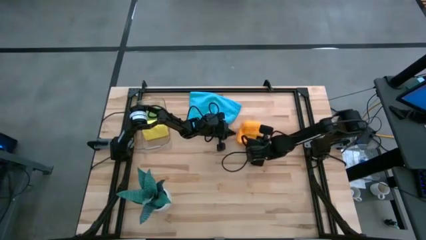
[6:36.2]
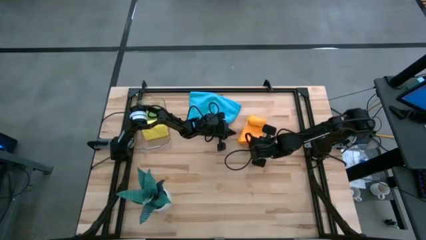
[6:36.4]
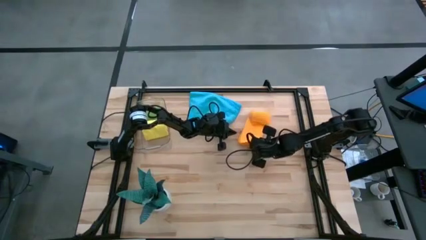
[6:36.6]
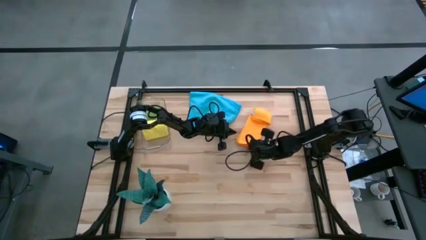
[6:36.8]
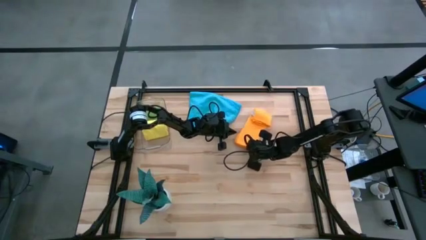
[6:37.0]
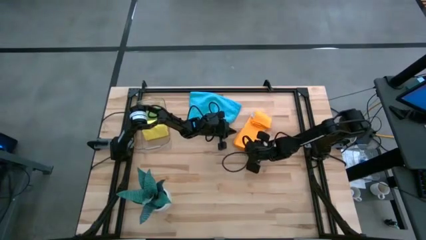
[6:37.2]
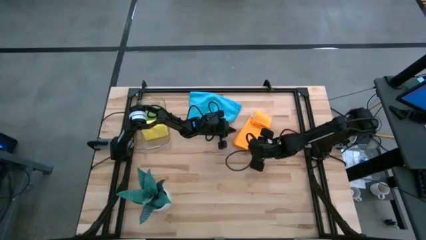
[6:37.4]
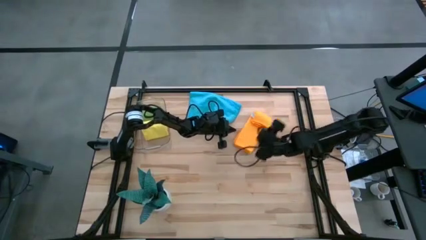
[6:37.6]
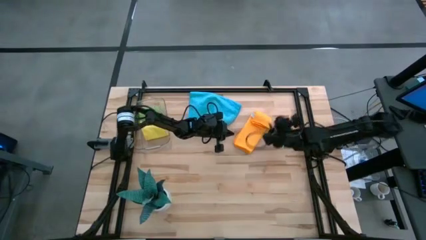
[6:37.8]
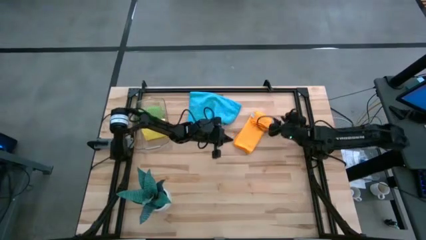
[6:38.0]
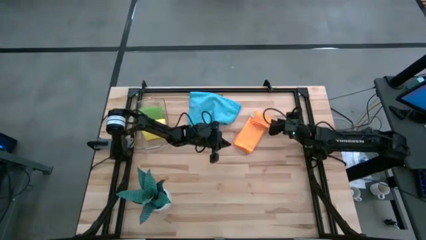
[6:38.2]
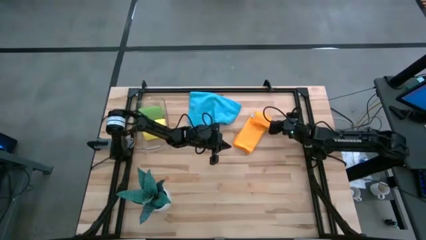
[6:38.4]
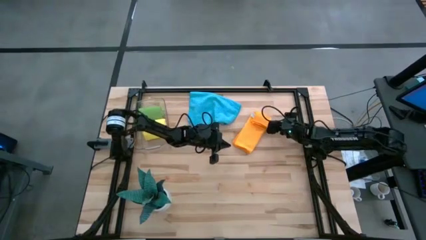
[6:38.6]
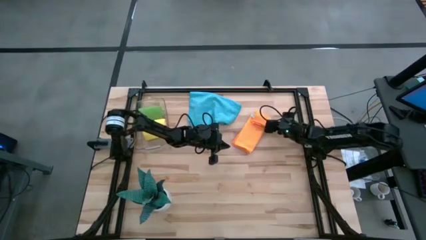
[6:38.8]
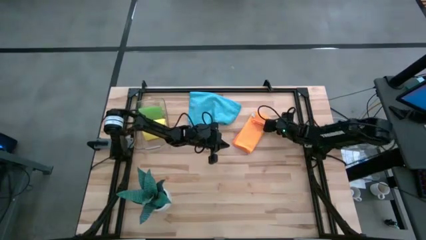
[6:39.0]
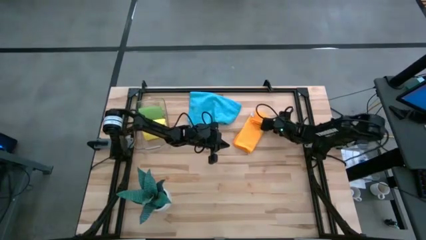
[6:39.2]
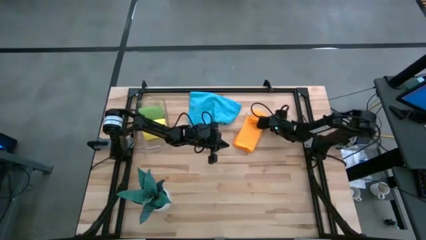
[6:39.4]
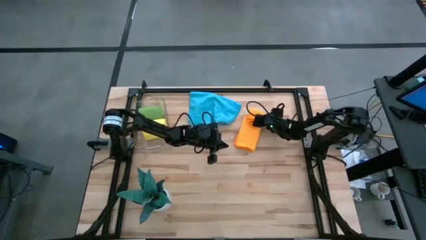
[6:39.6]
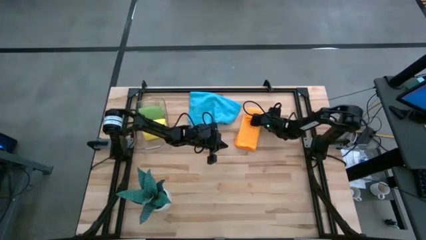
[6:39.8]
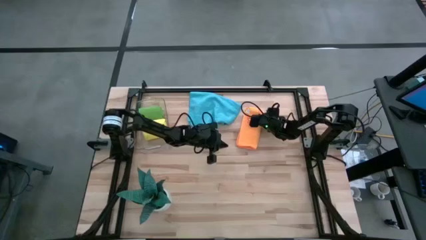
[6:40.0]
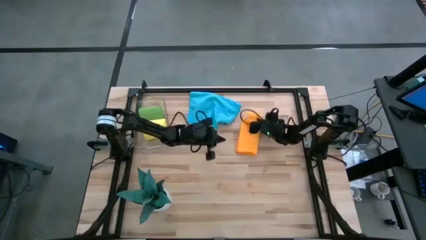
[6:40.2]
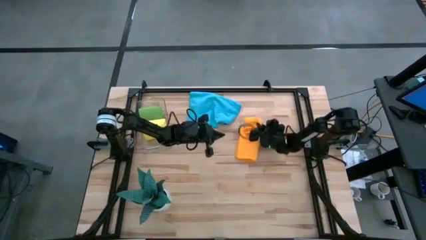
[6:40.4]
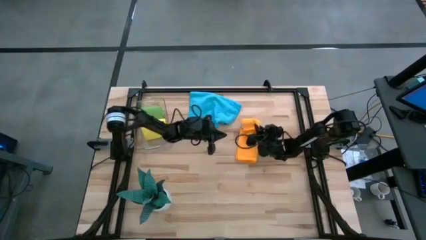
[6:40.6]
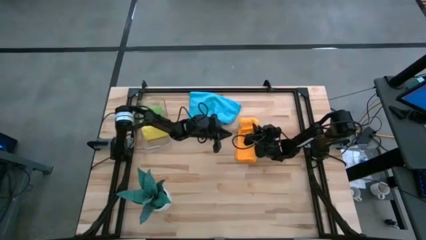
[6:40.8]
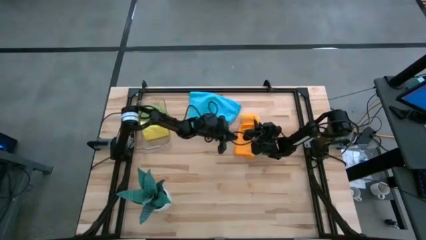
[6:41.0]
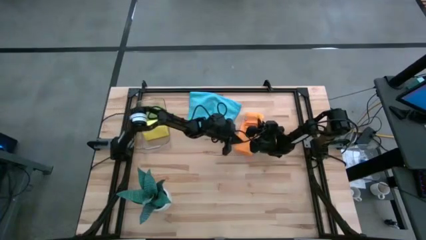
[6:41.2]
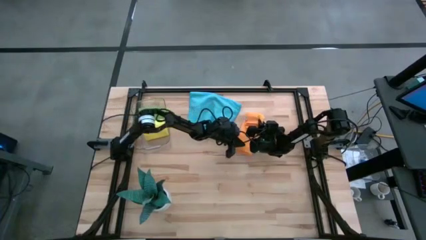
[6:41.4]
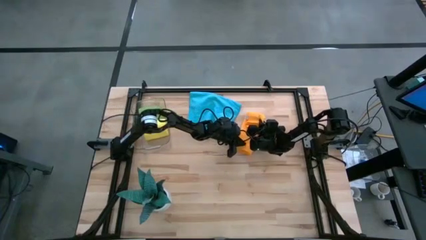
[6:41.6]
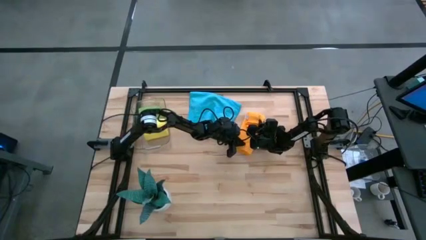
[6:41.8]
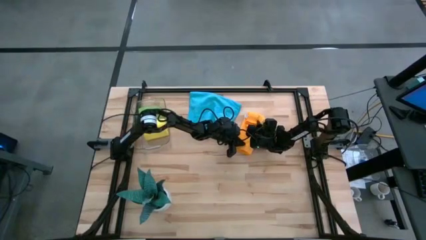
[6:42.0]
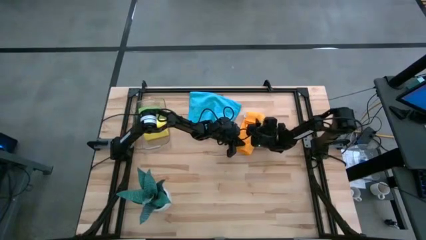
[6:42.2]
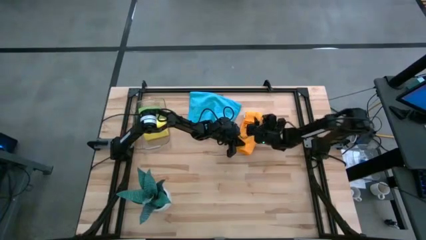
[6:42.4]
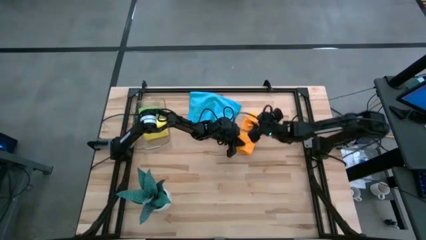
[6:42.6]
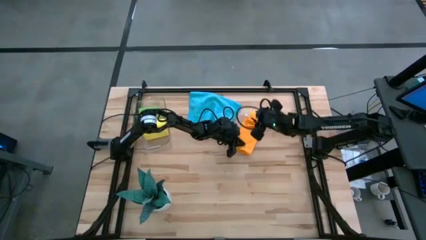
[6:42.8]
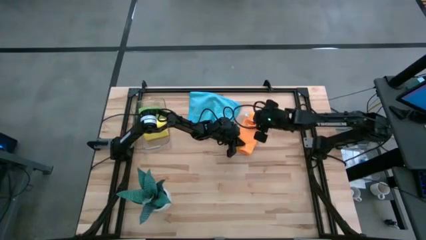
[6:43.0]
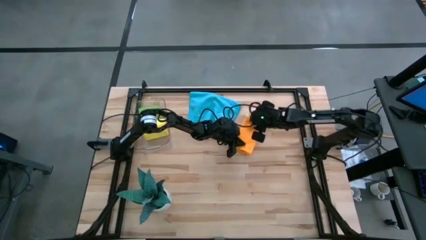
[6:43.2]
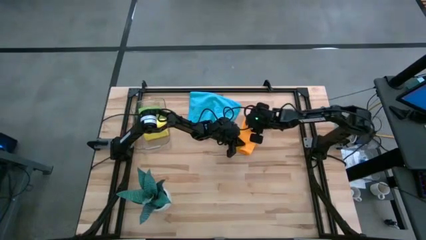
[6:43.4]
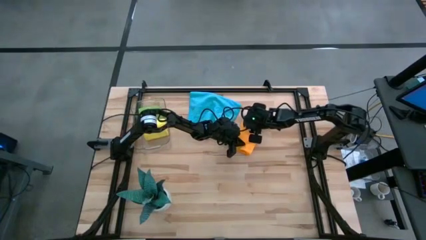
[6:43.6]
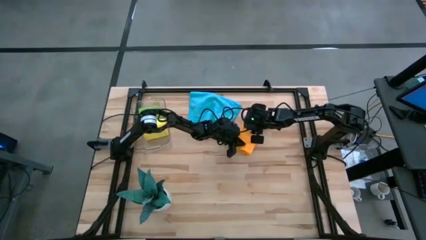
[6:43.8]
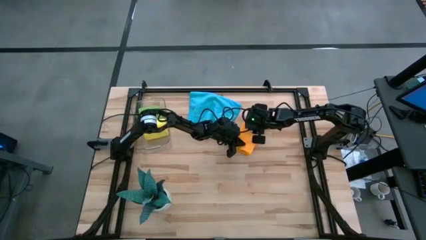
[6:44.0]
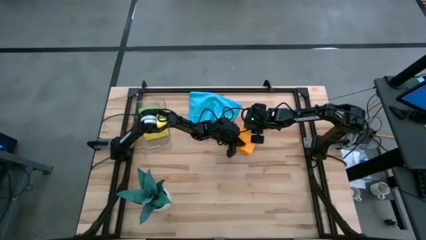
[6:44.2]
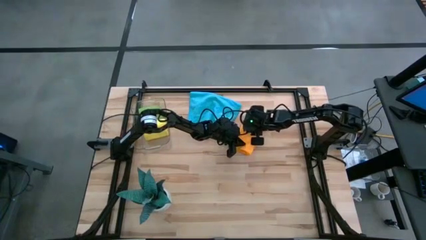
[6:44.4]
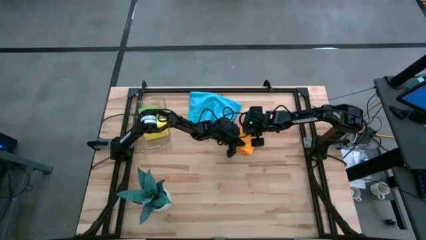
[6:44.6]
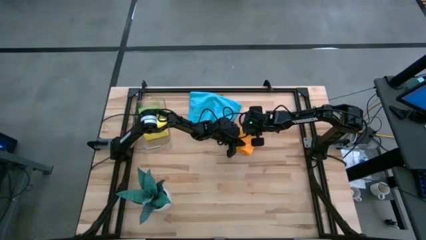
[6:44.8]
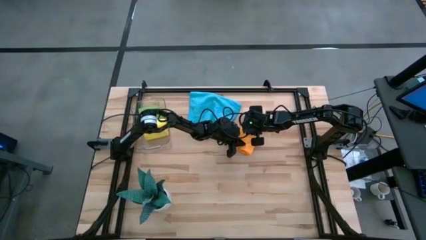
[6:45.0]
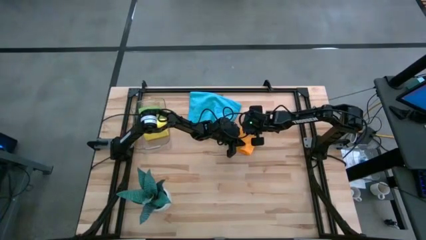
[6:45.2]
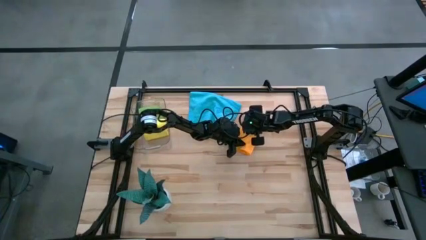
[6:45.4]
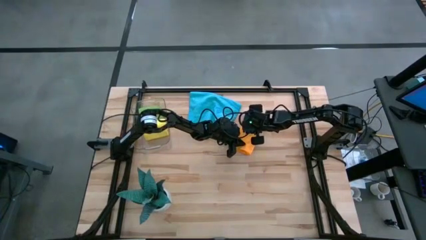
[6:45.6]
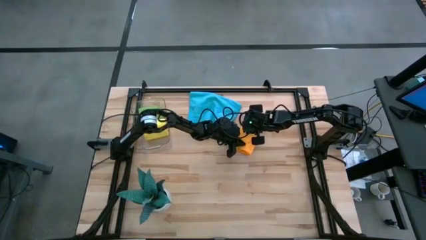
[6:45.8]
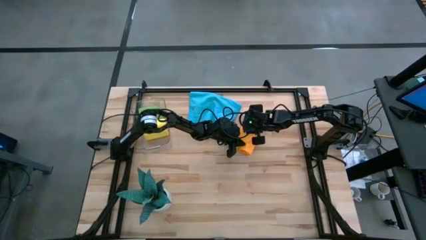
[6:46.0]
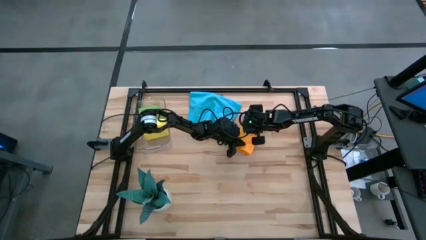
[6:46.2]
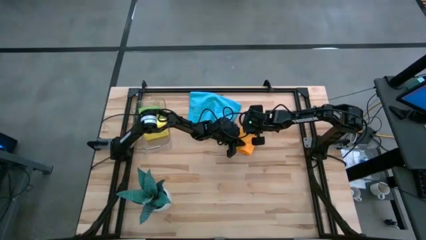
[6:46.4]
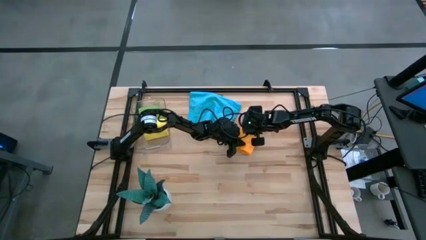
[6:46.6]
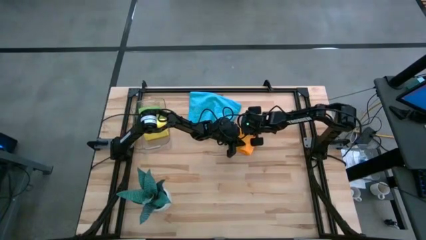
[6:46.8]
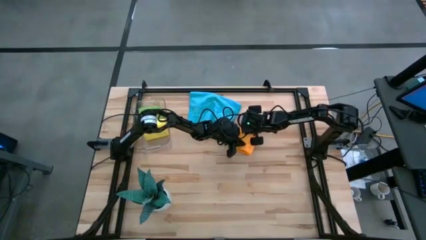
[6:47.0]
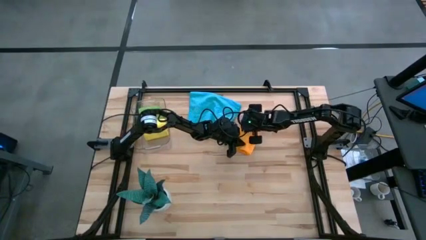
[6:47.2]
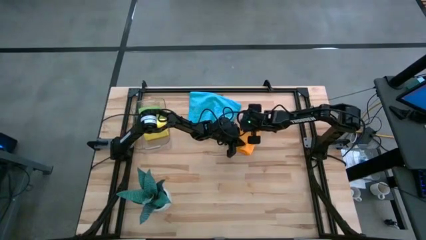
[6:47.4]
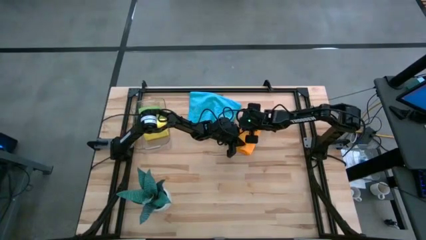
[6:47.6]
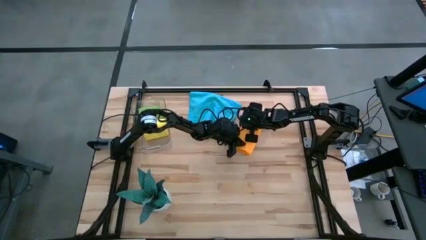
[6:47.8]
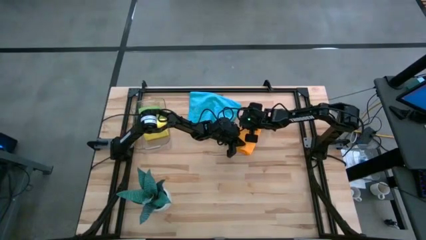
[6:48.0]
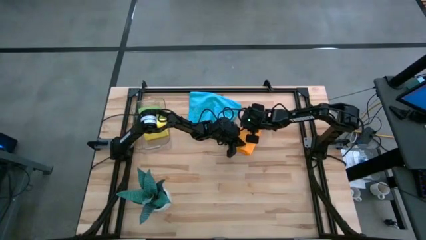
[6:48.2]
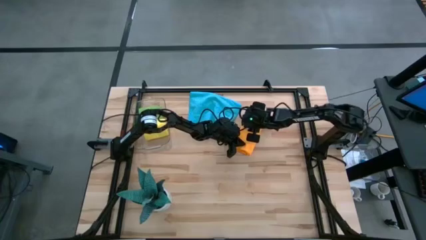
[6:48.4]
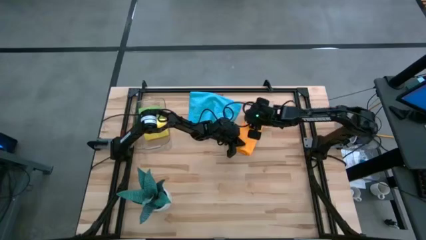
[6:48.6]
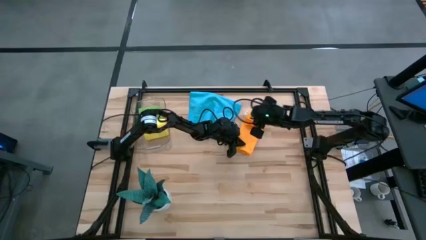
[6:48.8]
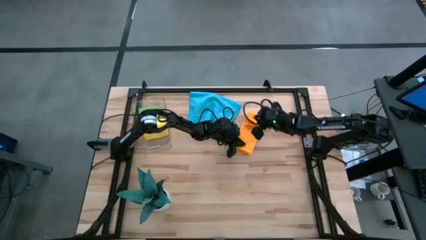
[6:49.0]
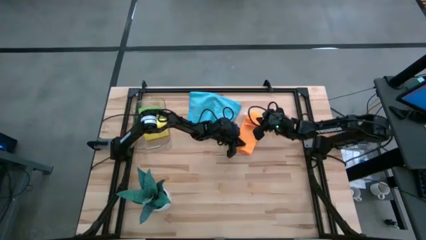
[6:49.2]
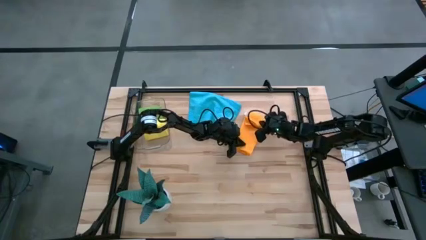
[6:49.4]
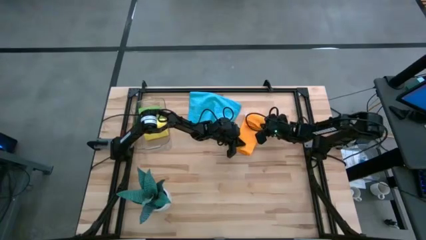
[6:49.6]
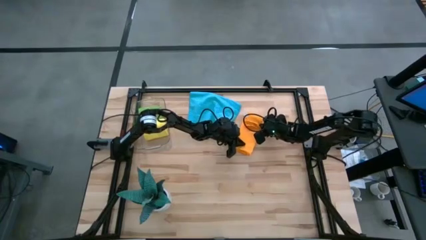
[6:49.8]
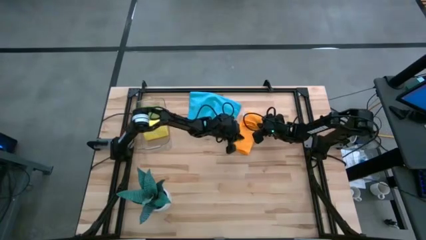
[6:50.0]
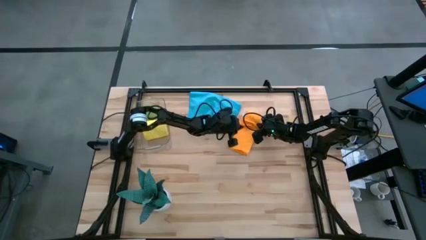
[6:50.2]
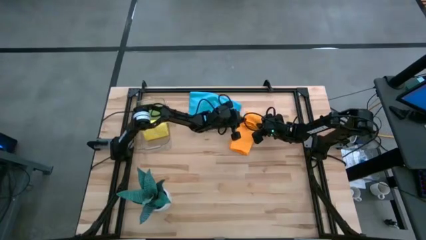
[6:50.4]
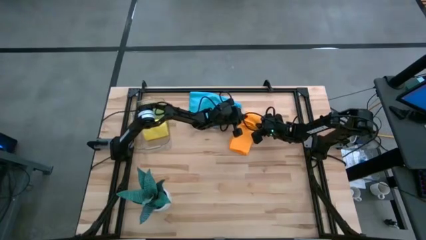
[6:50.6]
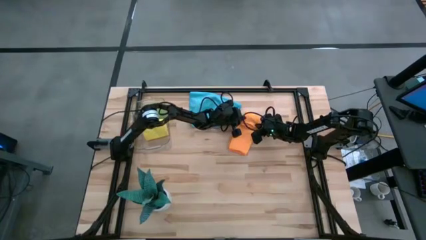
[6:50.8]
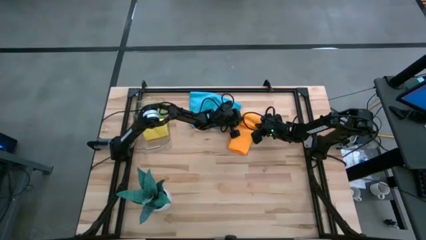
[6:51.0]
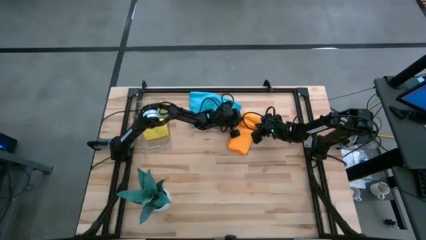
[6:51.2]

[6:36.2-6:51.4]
Task: Roll microfiber towels into tight, uniform cylinder then place into a basket
Roll the orange microfiber towel

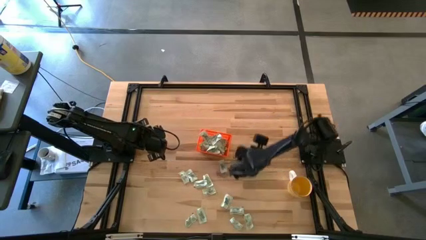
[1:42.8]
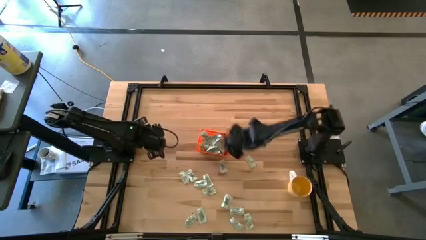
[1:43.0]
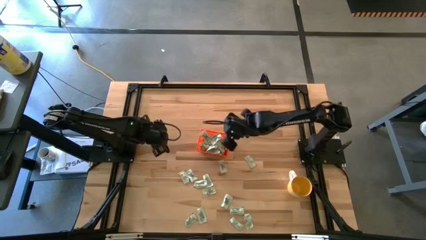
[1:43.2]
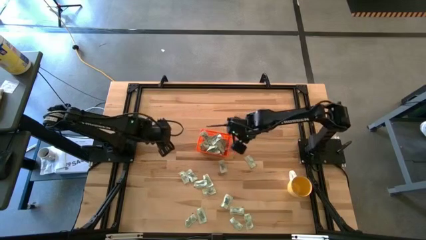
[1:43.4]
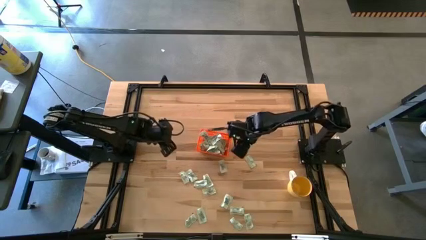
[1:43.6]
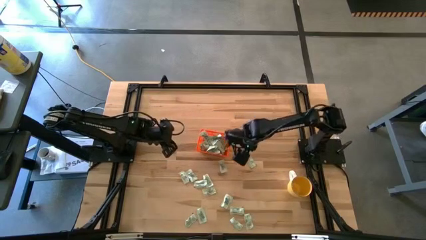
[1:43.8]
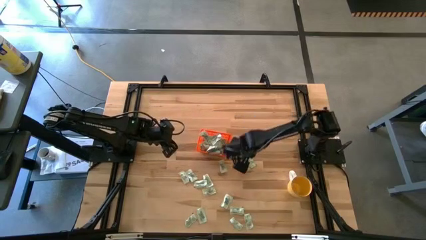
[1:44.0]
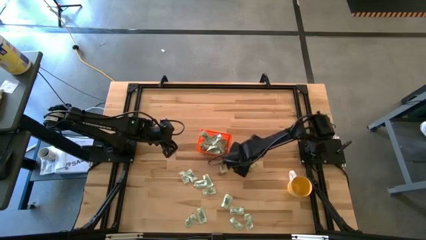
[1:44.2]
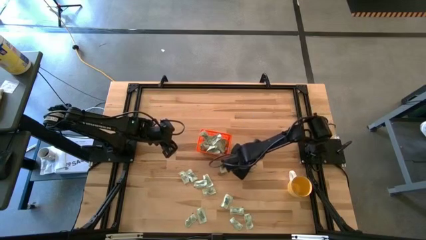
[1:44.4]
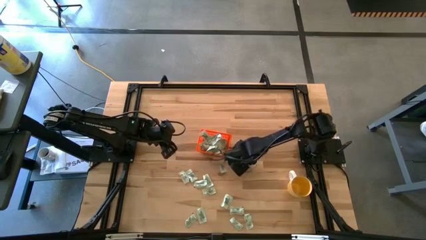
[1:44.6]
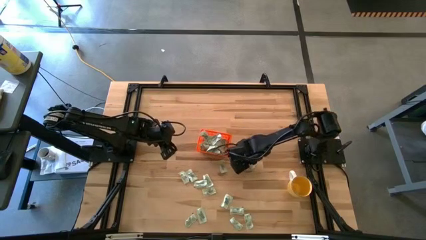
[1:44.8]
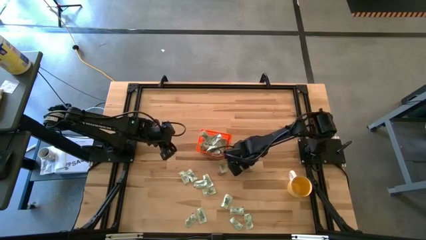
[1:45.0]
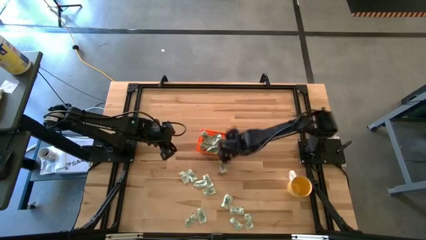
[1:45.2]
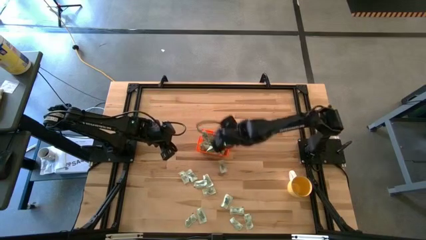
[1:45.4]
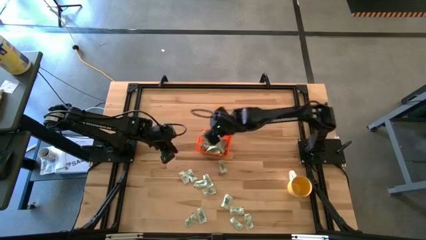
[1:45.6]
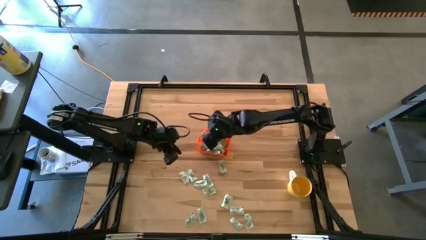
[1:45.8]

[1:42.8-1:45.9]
Task: Pick and place Stevia / Truvia into bins
Put the light green stevia packet into the orange bin
